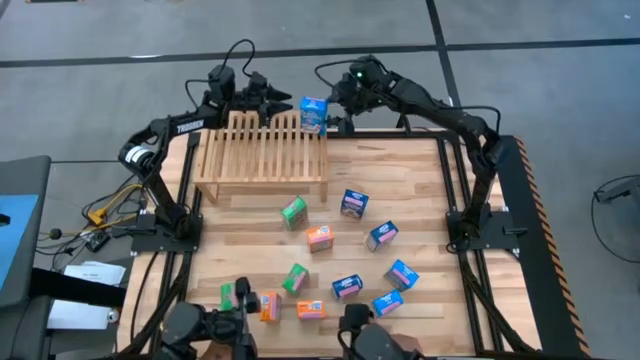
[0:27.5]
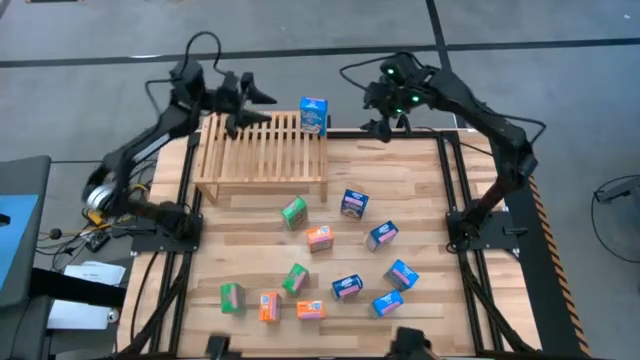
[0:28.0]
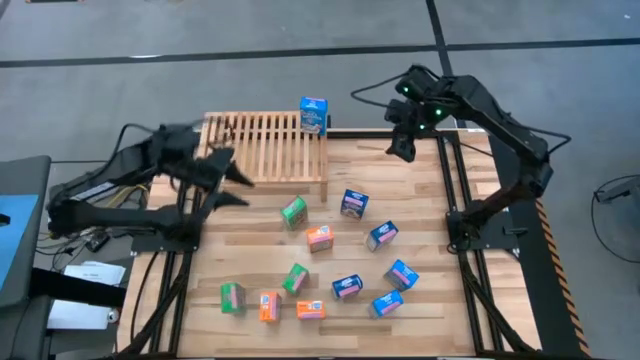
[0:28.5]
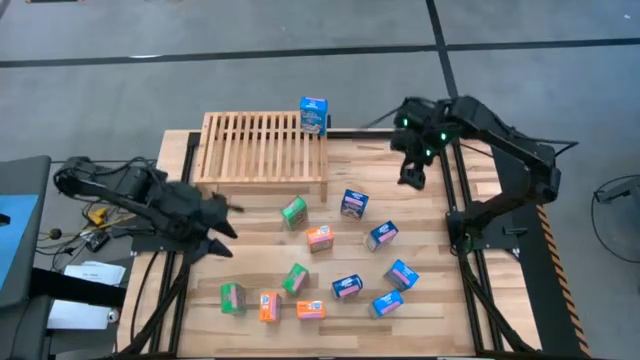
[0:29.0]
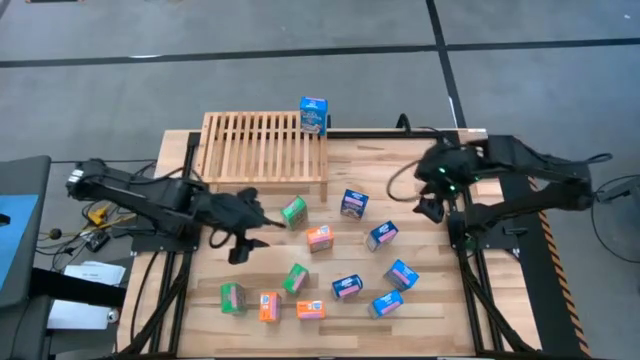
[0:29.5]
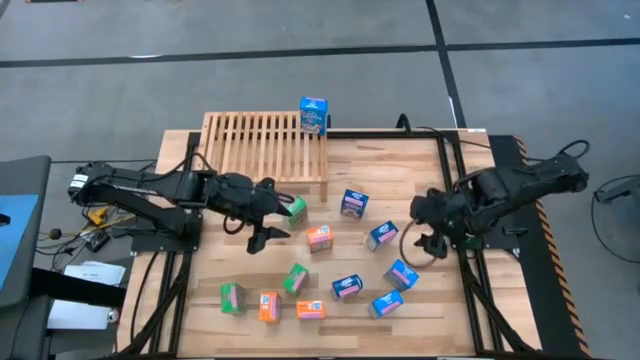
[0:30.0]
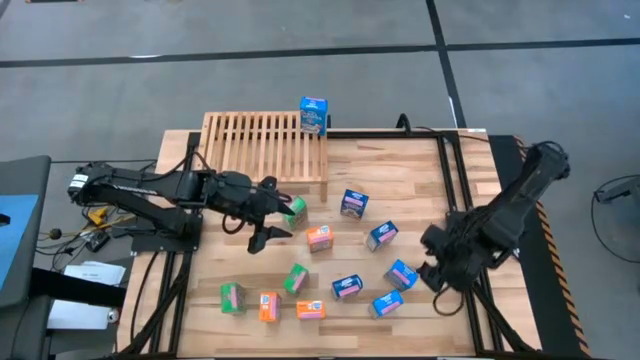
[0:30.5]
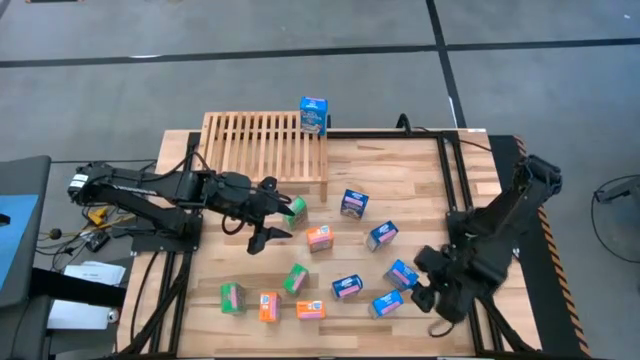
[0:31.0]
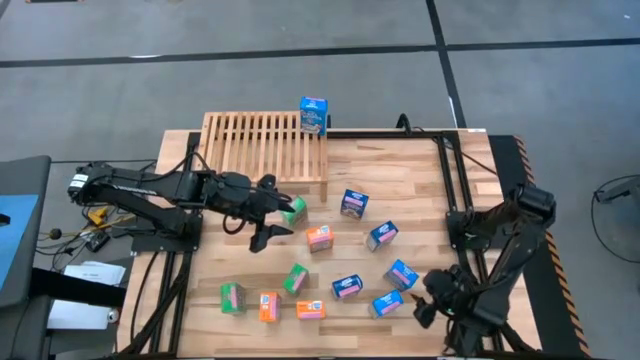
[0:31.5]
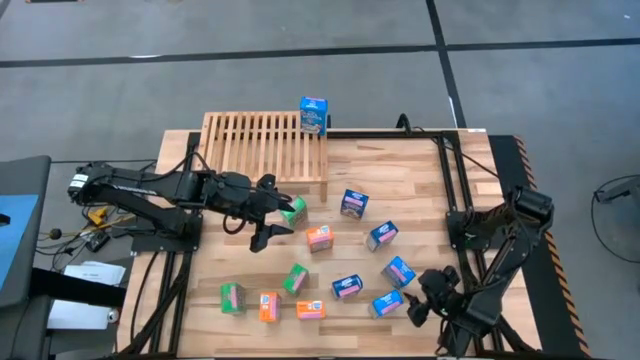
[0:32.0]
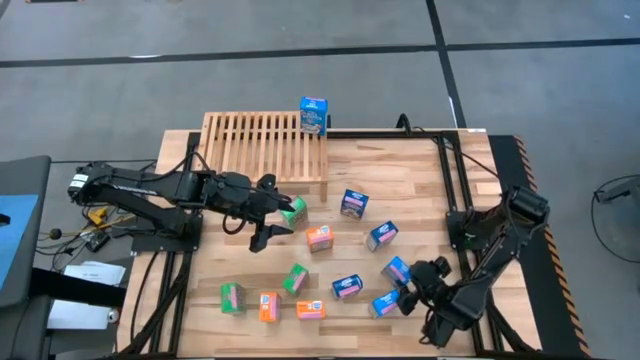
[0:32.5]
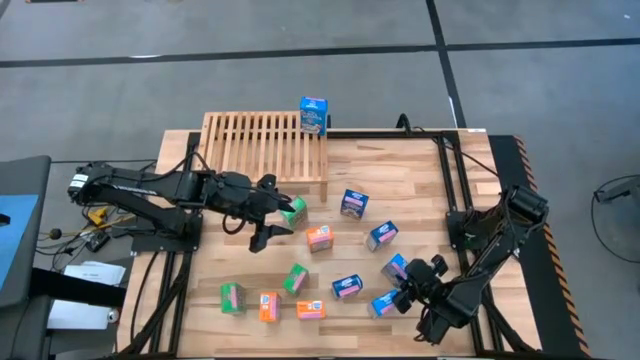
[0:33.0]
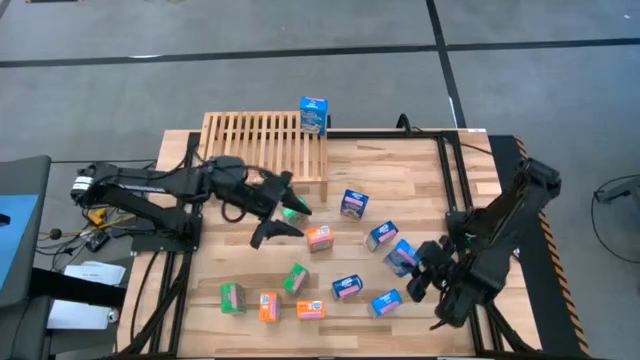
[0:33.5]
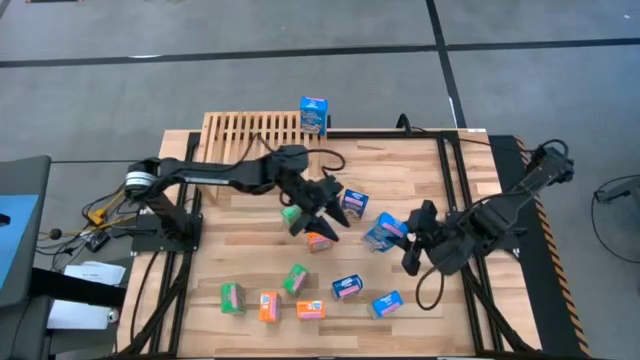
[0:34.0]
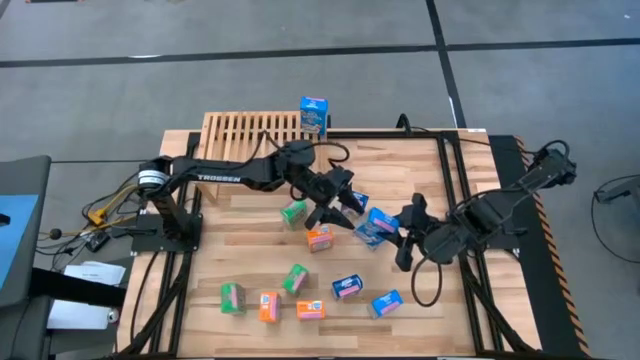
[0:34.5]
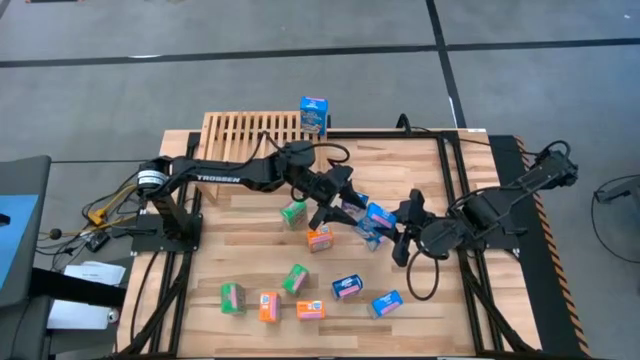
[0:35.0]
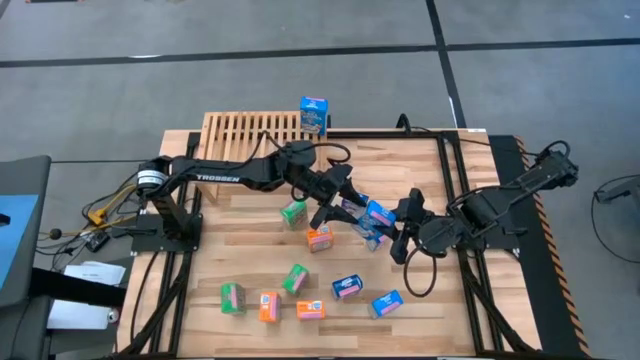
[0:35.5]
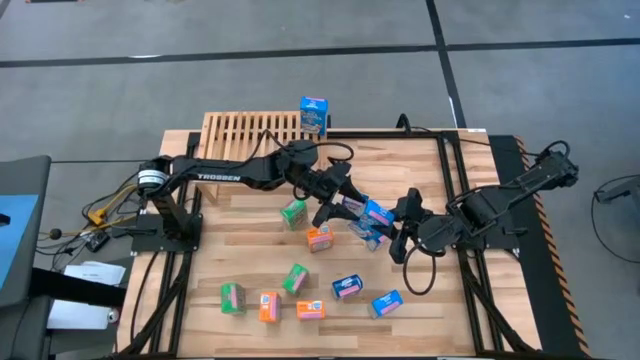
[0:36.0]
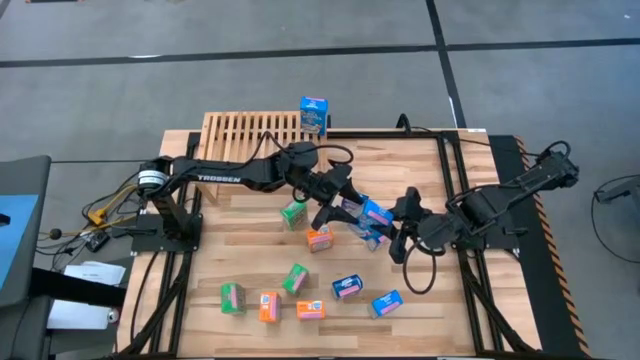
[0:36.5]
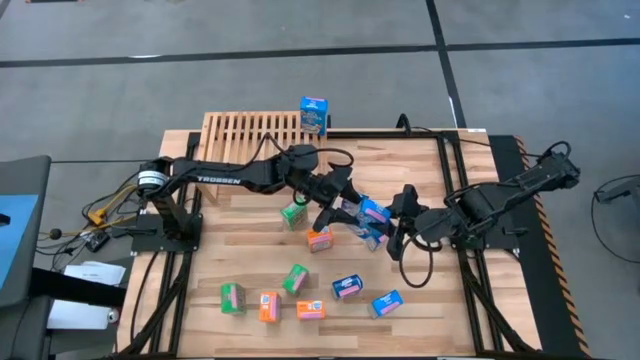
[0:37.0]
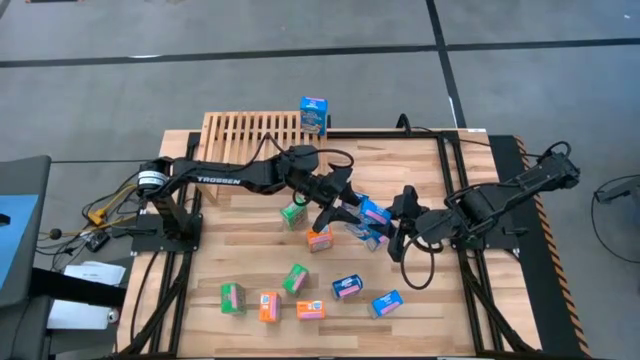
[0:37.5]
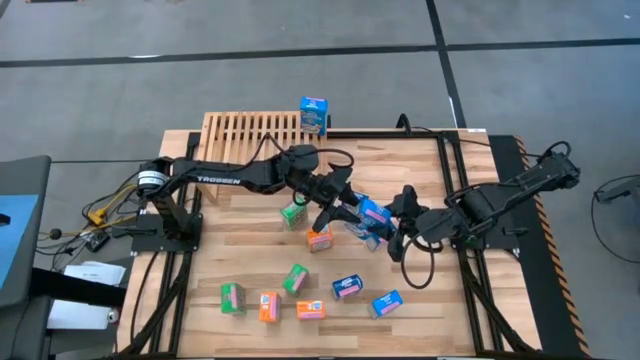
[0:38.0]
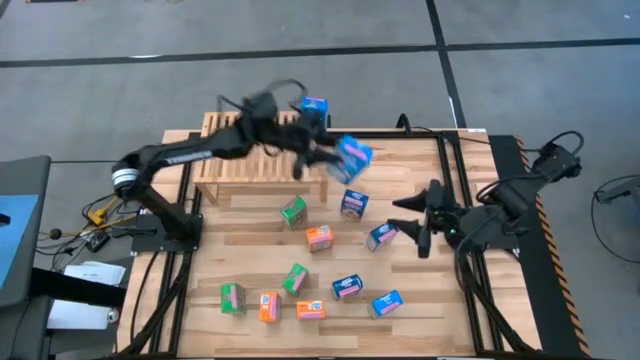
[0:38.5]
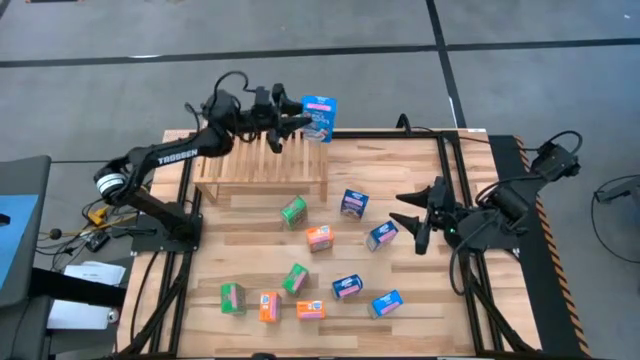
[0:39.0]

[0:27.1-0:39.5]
Task: Stack cereal on shelf
Put the top light blue cereal box on the shelf aligned with the other light blue cereal box

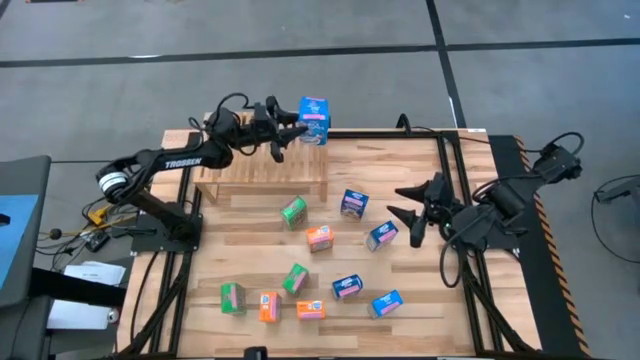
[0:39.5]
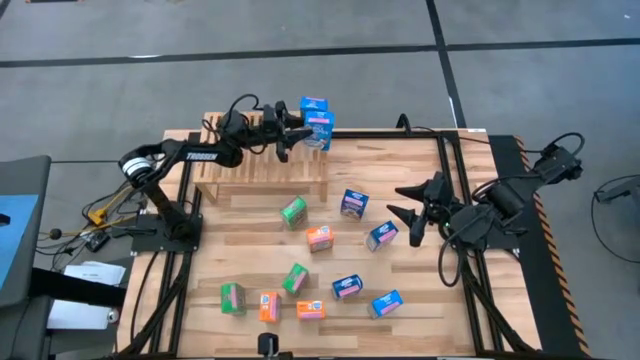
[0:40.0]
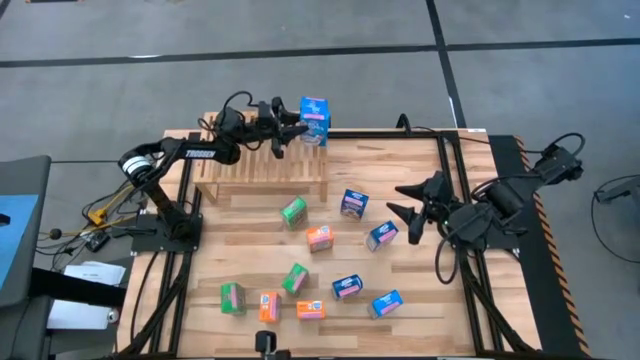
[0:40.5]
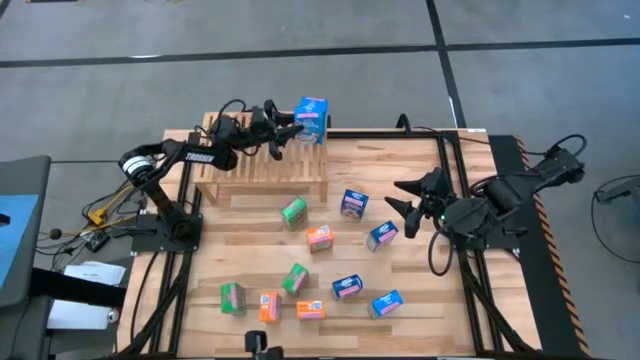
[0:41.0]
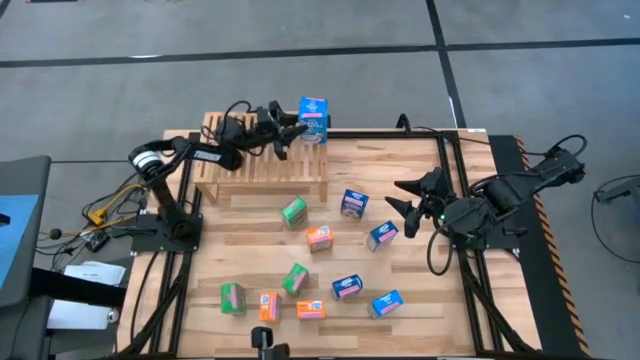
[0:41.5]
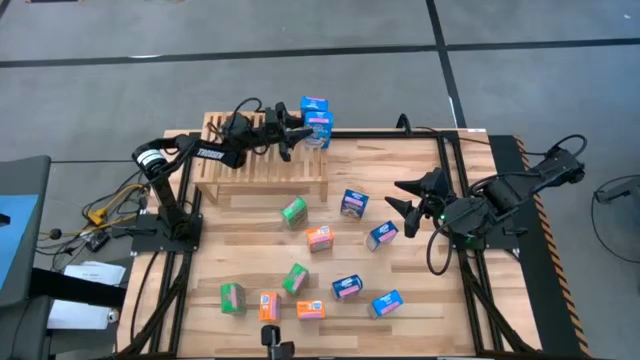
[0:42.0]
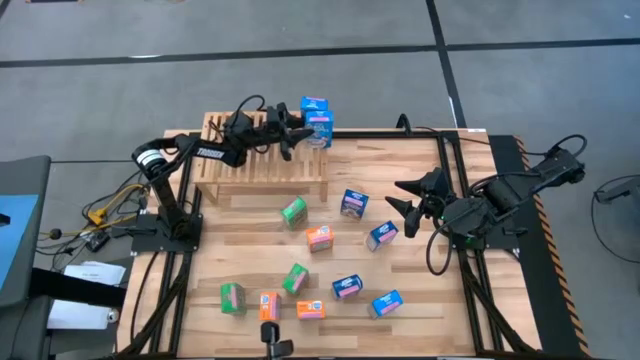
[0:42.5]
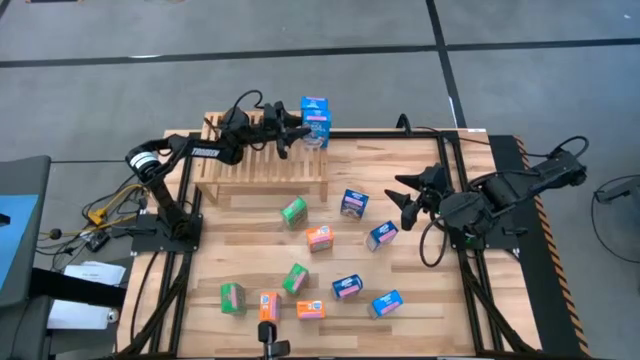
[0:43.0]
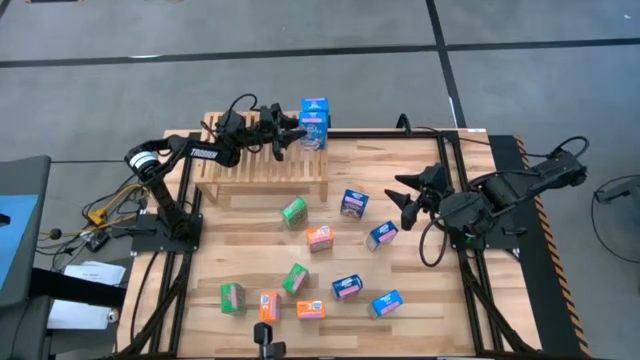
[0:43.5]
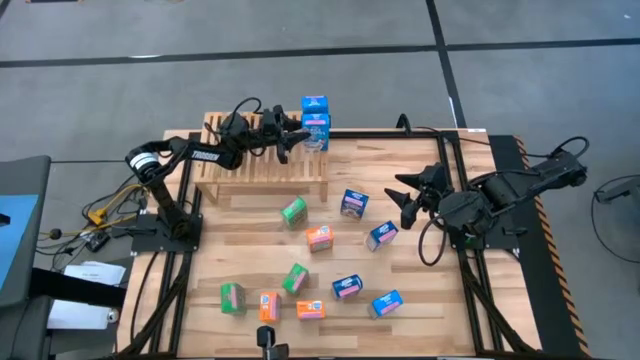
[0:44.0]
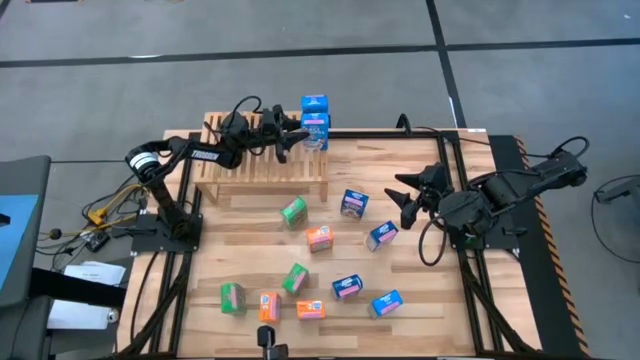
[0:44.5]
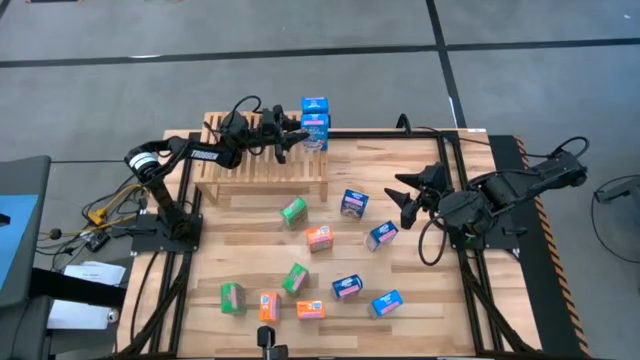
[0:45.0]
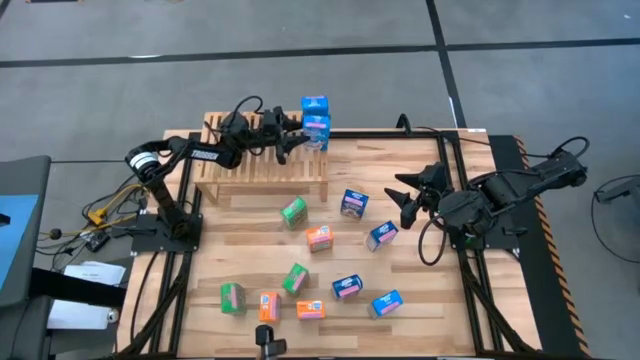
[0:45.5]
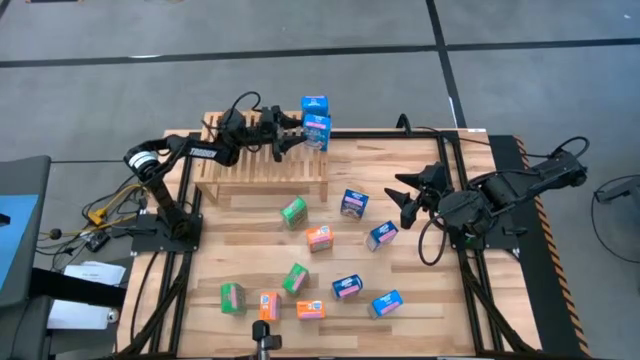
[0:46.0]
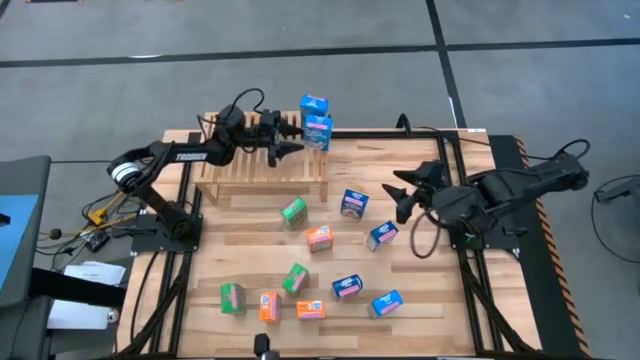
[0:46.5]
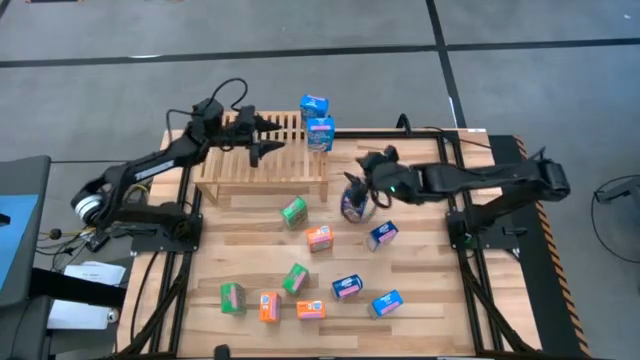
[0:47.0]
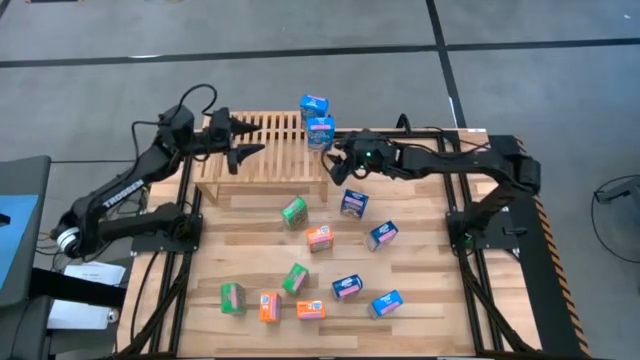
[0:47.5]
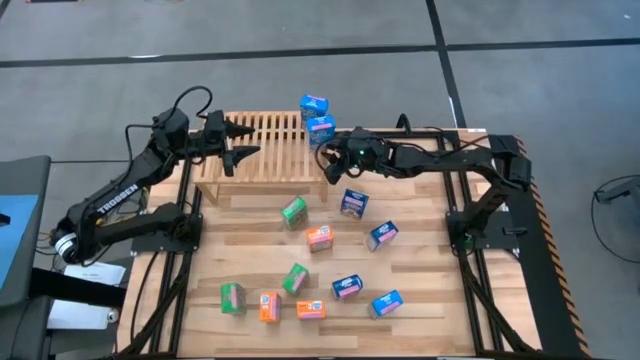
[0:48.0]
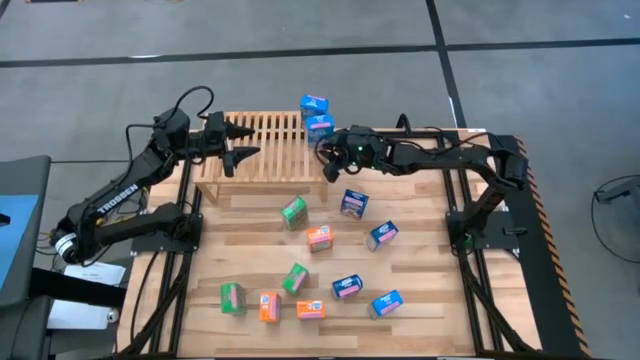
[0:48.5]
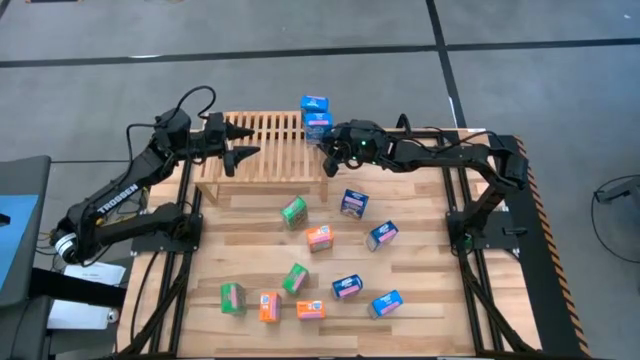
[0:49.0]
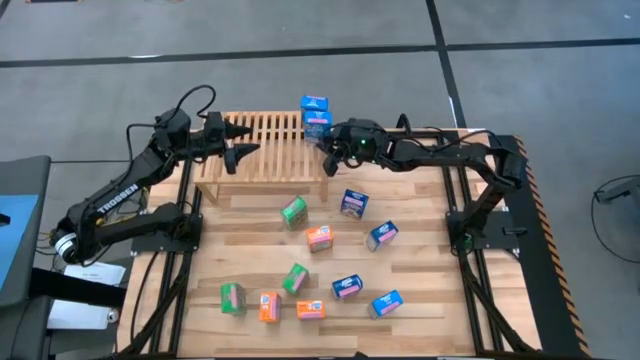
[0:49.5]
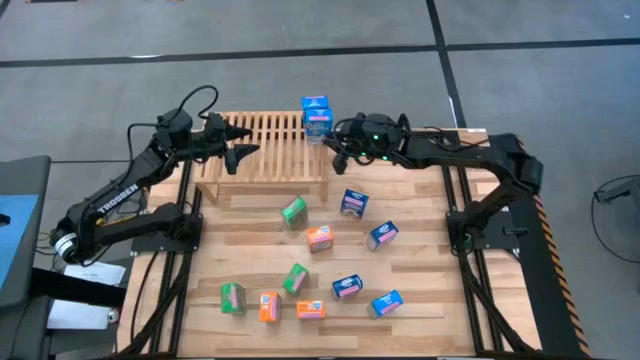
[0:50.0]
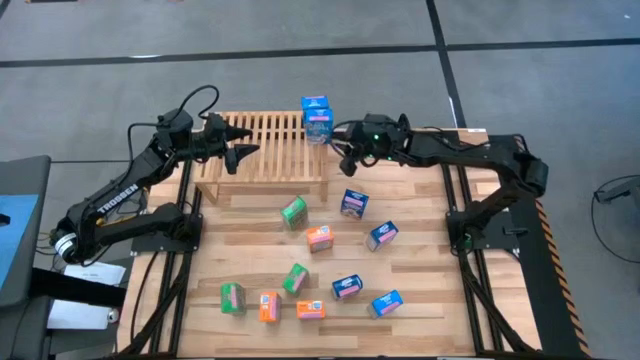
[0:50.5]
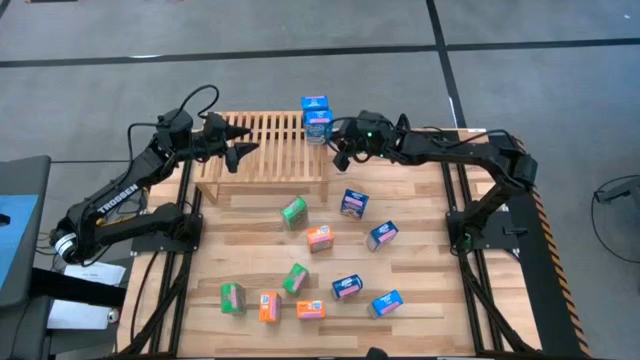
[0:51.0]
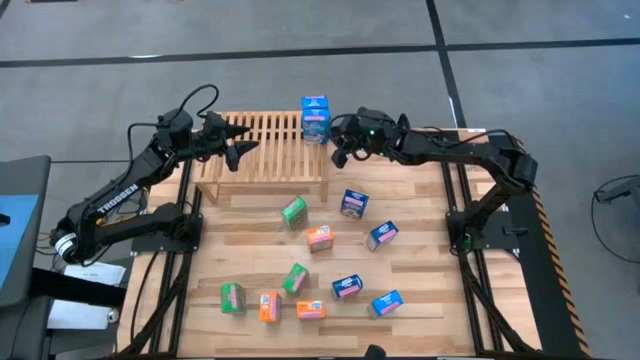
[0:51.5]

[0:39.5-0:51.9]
Put the top light blue cereal box on the shelf aligned with the other light blue cereal box
